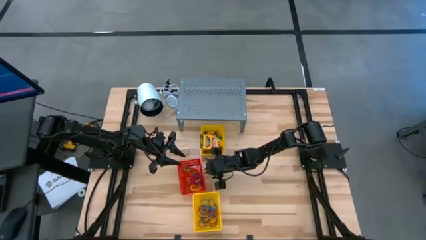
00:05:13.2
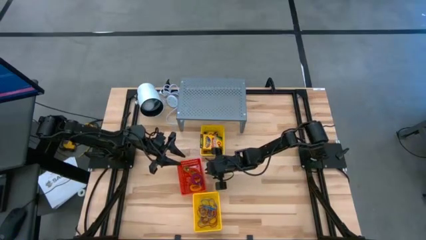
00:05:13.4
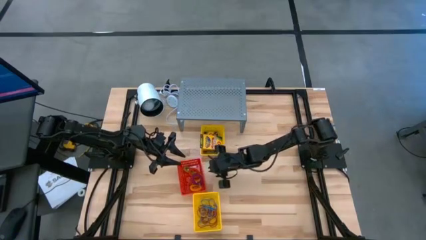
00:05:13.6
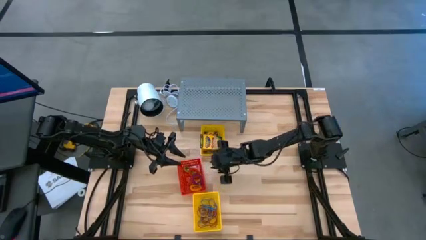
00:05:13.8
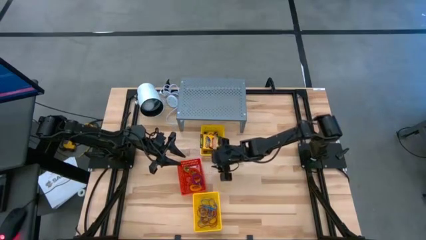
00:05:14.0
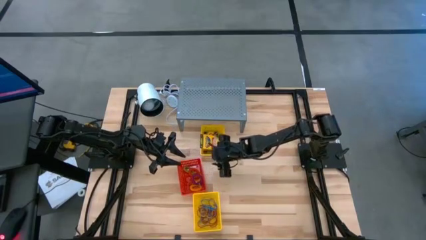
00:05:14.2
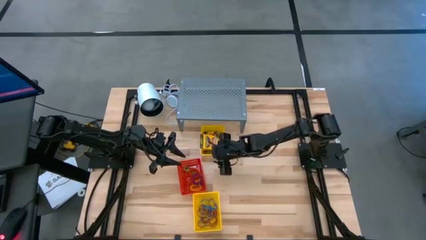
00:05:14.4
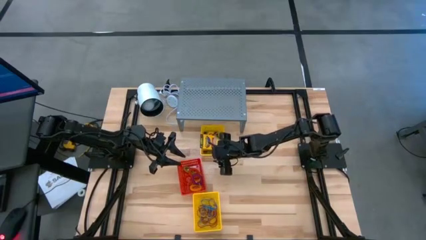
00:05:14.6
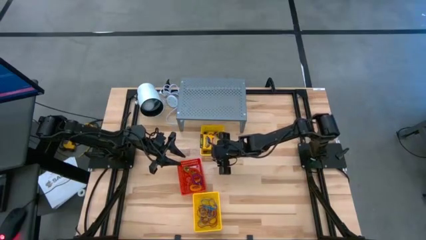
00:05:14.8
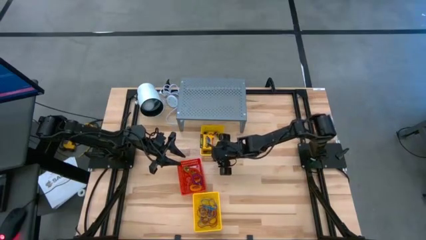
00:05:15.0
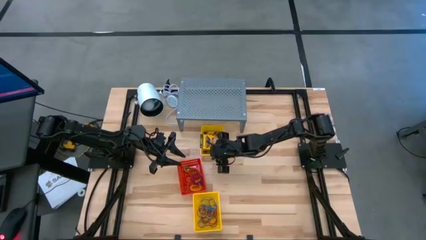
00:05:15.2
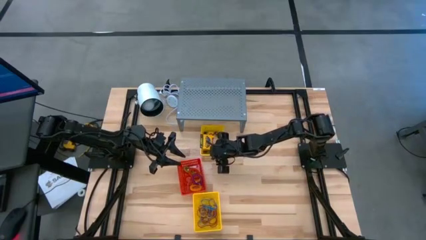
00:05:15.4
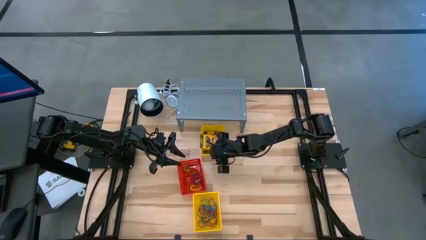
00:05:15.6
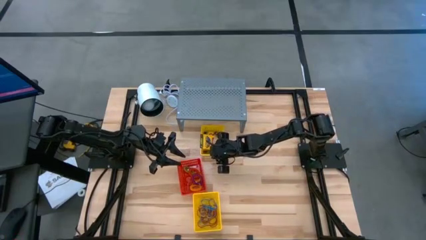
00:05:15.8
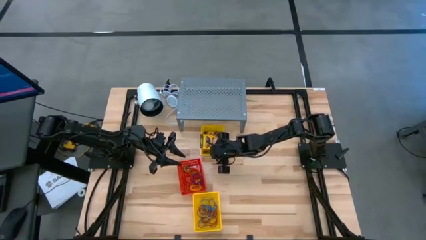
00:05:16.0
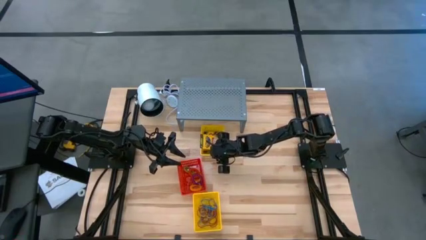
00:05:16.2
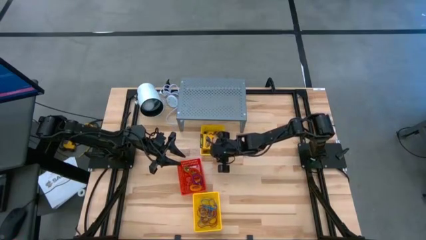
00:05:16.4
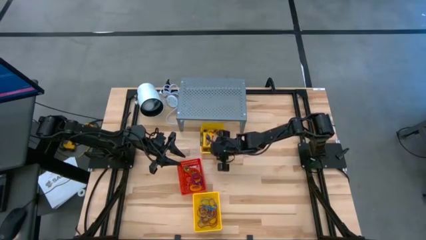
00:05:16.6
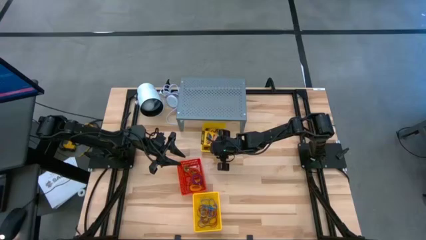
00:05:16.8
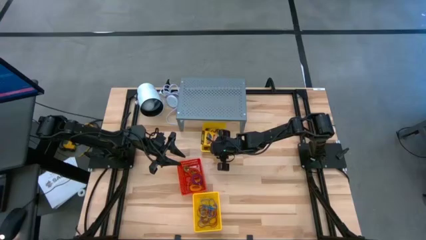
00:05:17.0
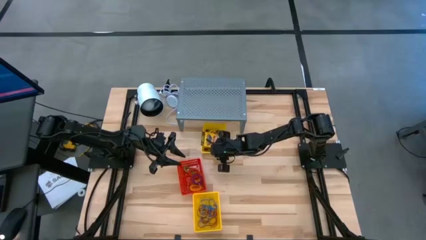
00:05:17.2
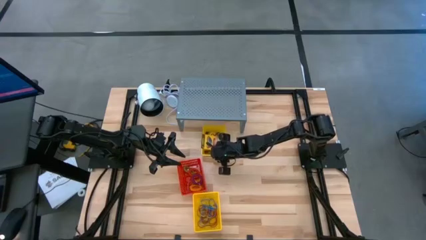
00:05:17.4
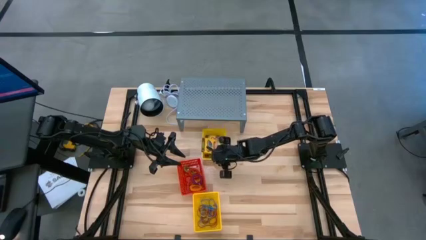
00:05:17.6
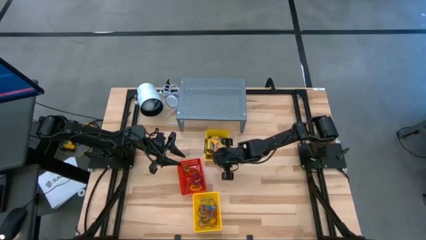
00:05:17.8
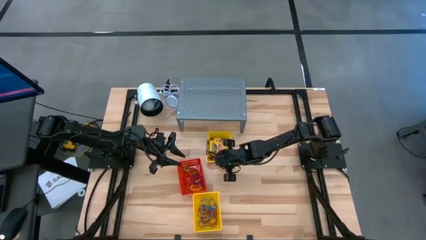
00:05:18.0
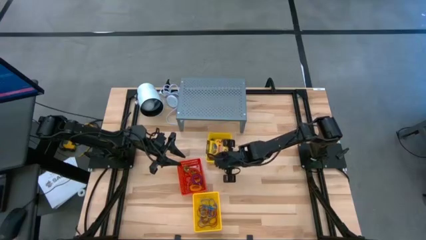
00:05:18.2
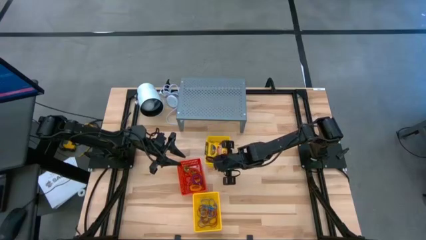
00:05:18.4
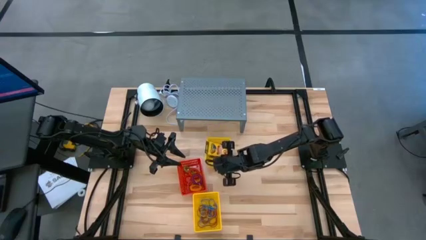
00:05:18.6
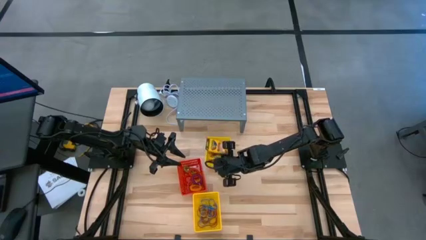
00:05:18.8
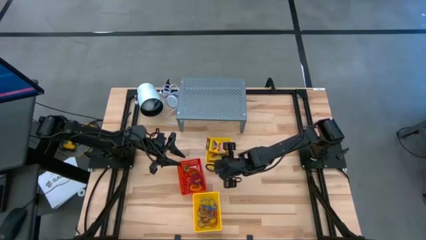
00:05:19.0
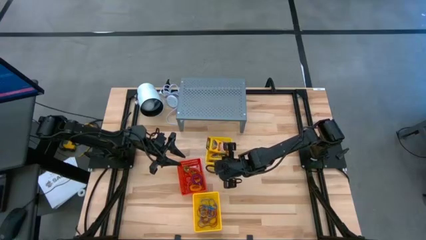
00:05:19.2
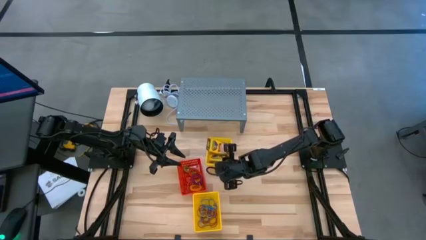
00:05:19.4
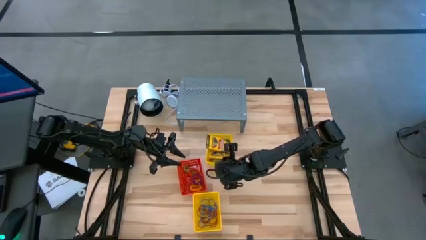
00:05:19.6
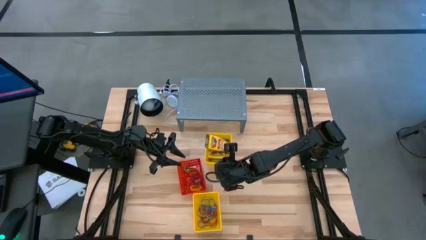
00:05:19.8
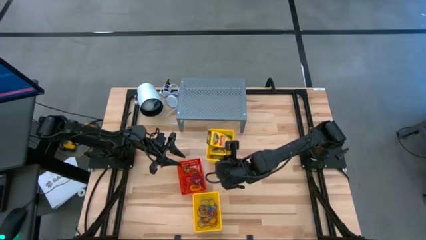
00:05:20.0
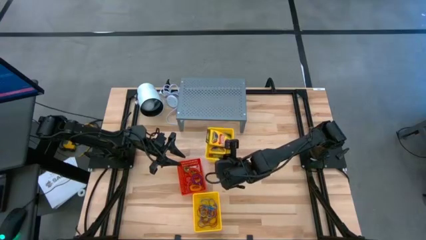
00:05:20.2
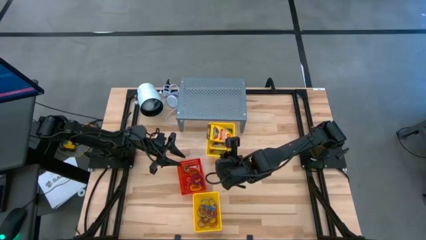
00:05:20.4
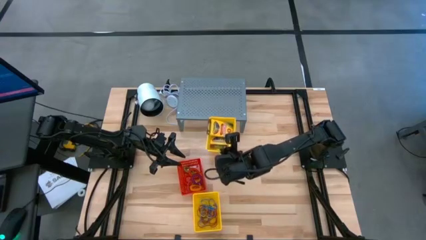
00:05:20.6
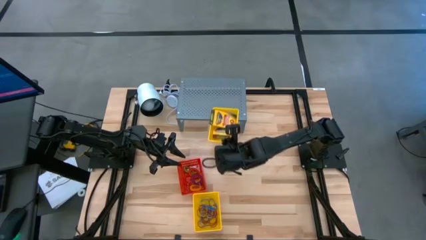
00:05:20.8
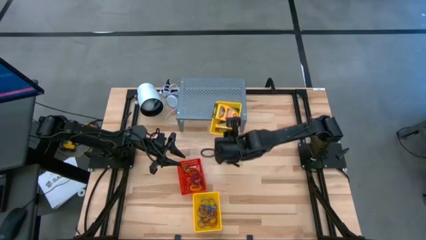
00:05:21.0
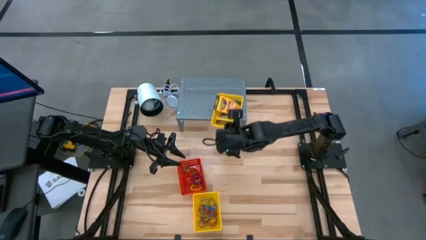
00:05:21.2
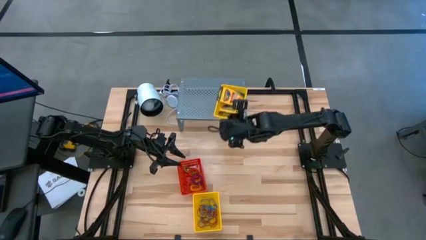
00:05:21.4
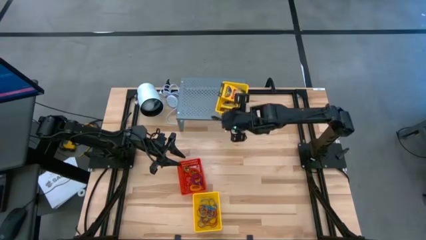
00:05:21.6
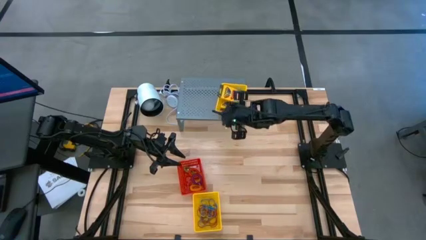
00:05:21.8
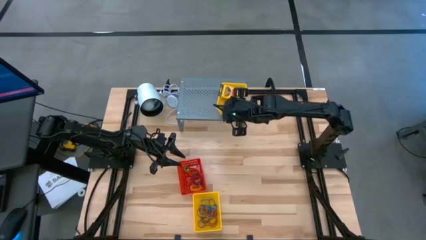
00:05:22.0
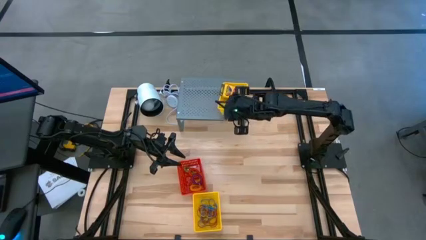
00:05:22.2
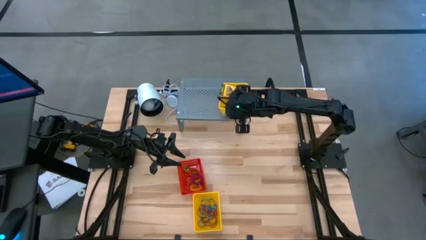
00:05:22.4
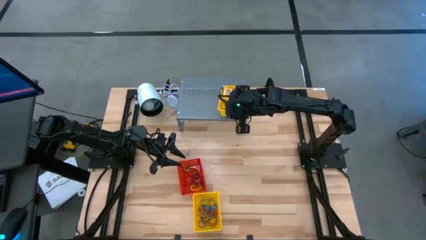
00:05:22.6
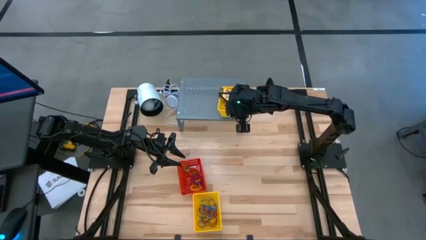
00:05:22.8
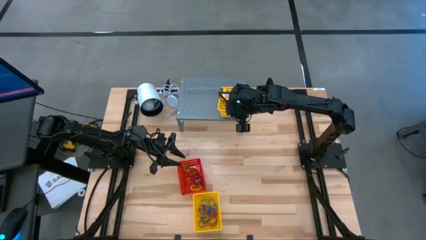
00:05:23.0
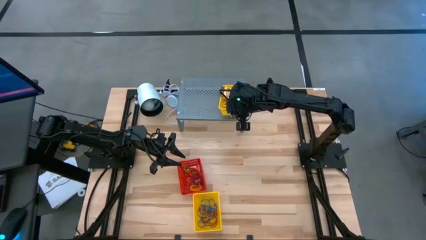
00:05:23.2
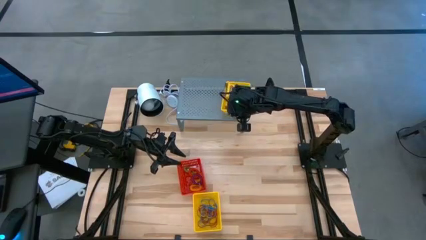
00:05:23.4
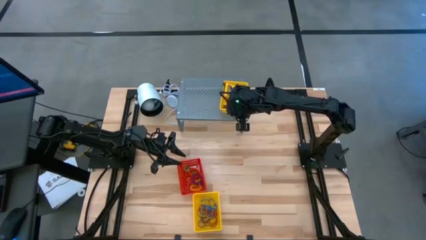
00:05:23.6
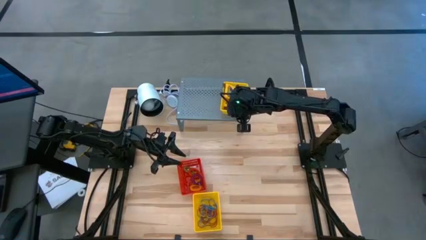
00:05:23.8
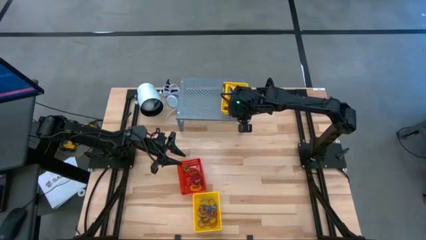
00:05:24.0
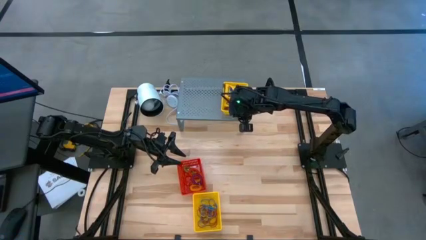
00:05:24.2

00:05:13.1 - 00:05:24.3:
Task: Pick & Place Office Desk Supplies
Put the top yellow bin on the shelf

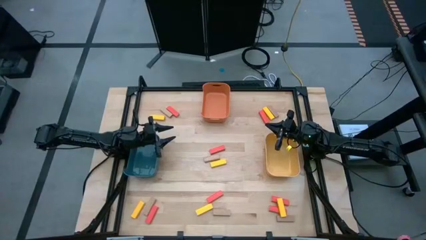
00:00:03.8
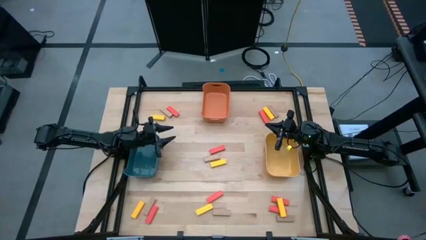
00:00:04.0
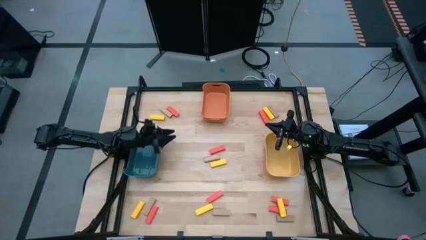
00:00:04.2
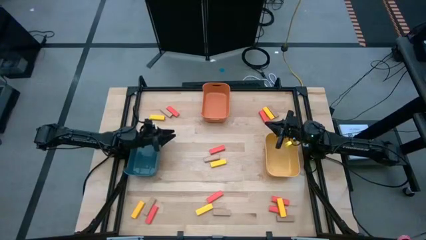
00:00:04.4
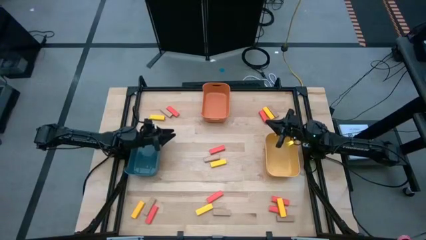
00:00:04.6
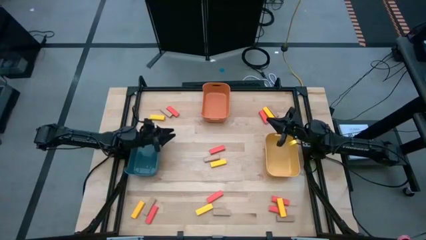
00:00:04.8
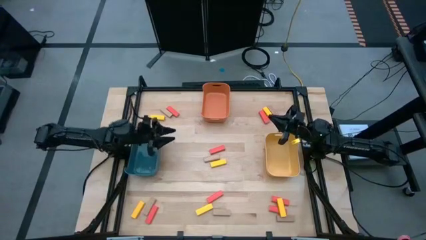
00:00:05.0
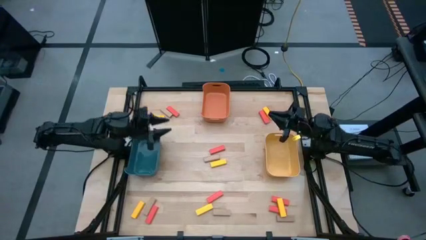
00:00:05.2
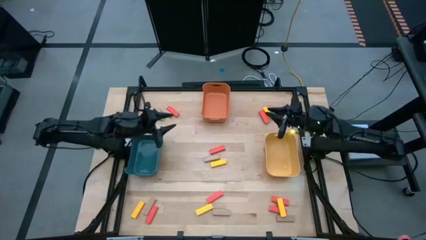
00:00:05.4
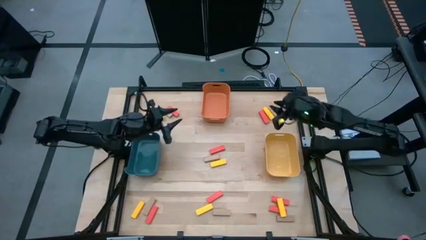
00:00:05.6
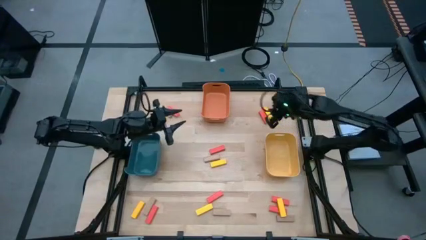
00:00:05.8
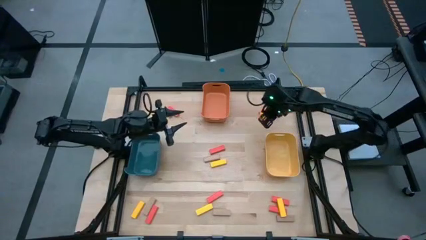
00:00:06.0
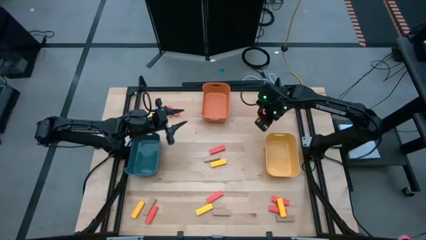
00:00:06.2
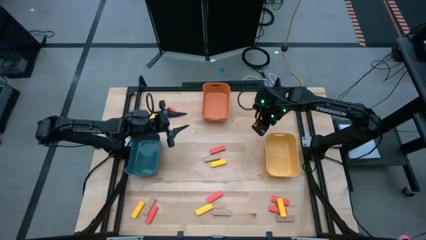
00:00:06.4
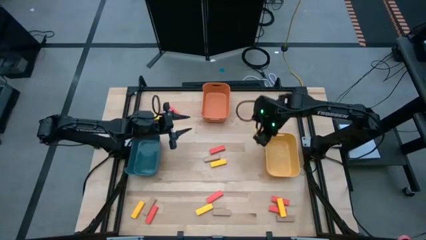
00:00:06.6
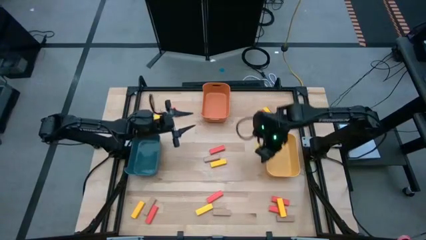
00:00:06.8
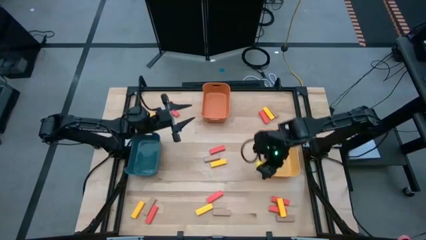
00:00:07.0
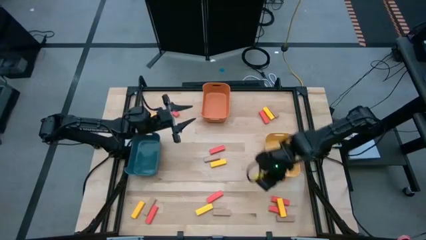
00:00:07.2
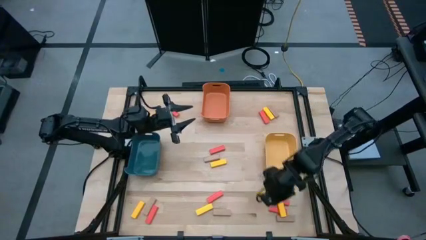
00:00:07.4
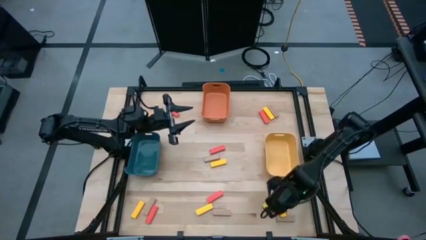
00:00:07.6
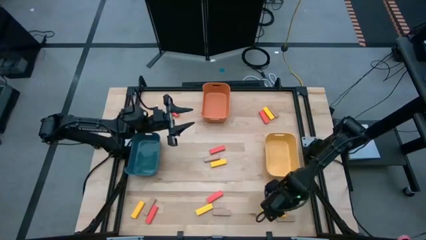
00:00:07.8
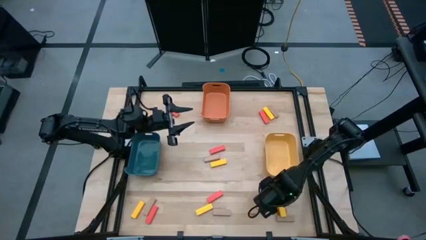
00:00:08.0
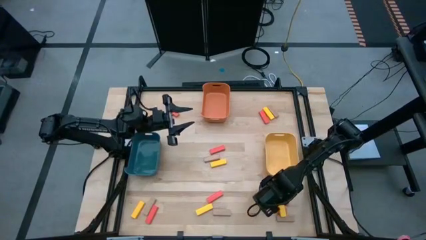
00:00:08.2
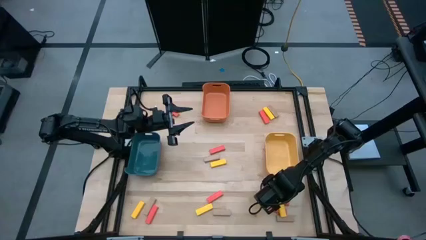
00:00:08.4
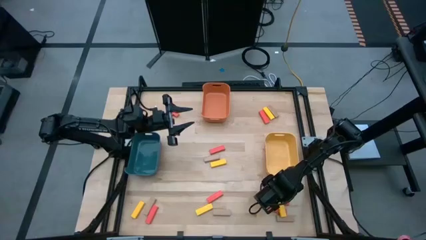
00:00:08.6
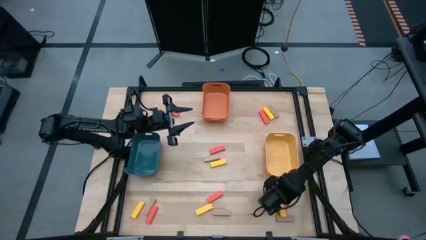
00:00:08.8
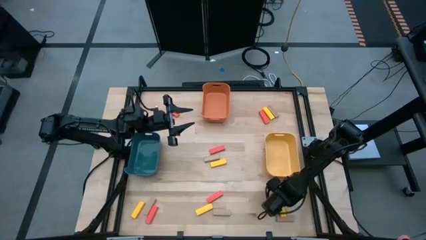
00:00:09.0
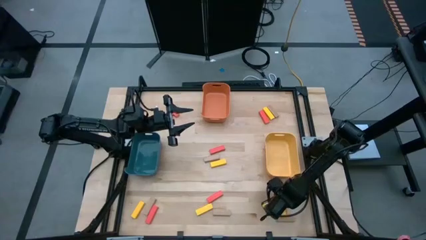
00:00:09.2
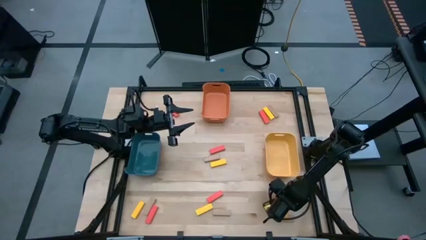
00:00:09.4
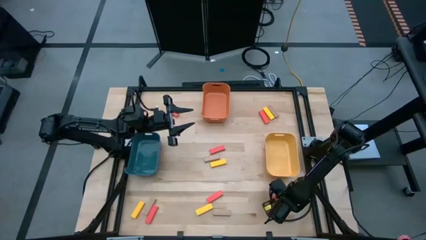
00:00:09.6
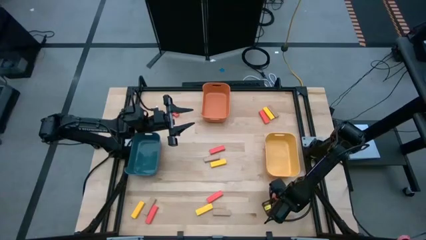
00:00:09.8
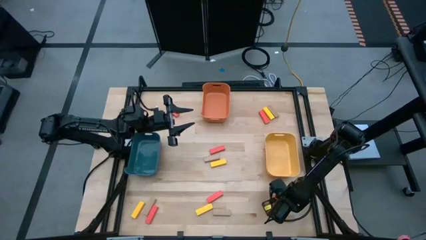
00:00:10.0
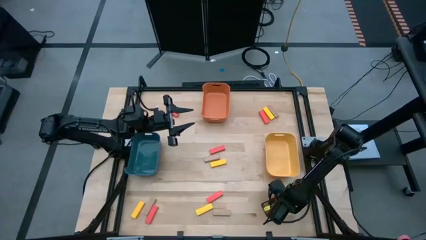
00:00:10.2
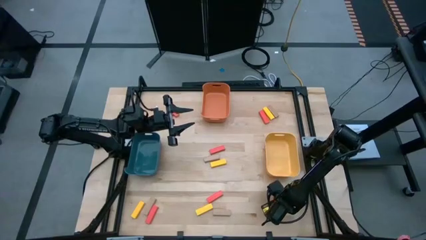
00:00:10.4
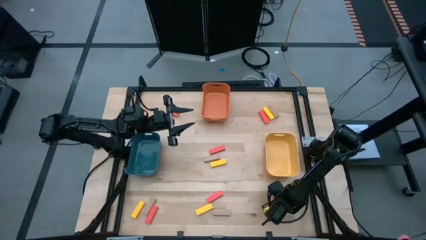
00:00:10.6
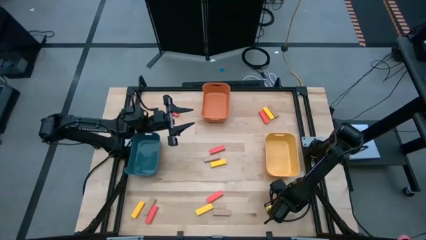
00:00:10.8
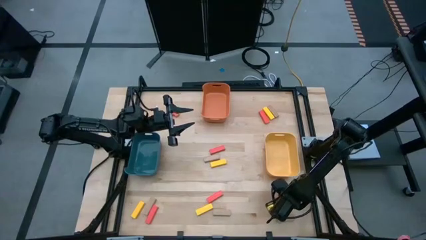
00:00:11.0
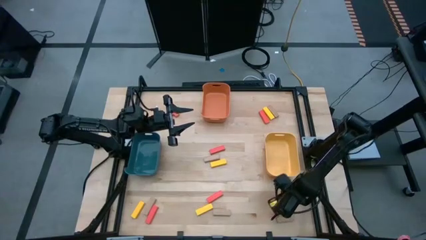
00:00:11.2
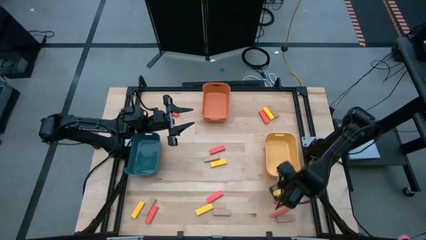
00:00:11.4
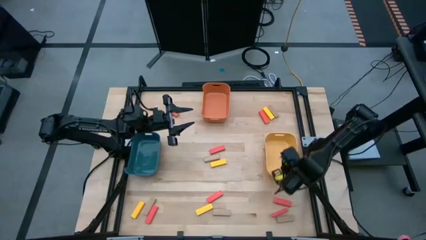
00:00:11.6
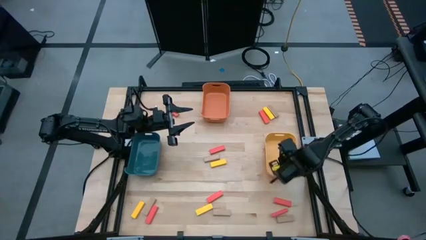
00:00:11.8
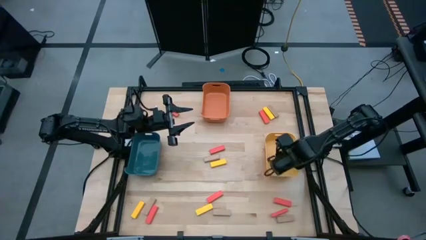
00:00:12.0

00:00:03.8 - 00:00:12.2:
Task: Sort blocks
Put the bottom right yellow block into the yellow bin
